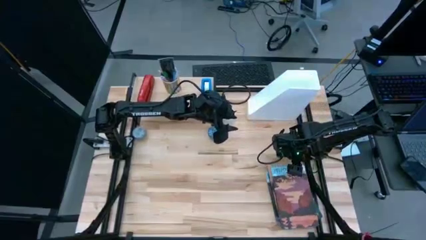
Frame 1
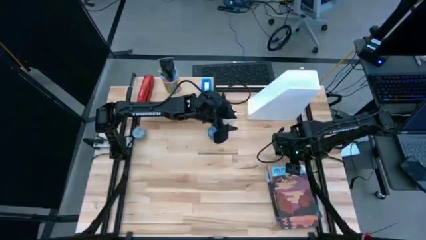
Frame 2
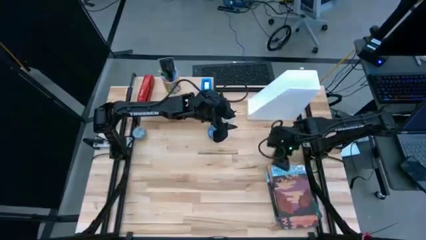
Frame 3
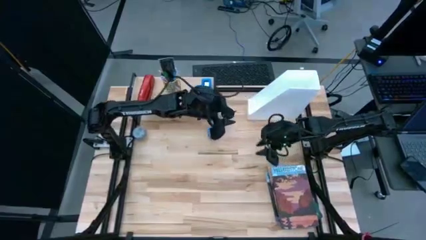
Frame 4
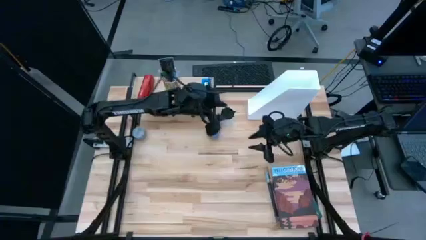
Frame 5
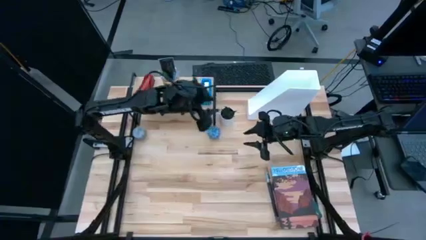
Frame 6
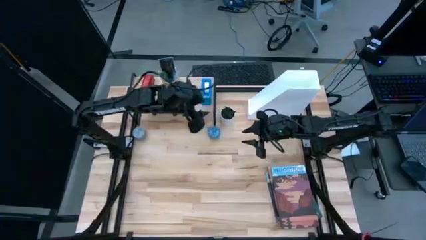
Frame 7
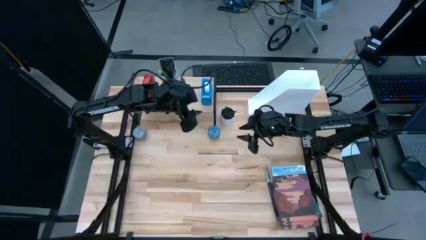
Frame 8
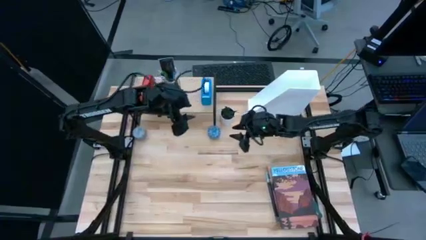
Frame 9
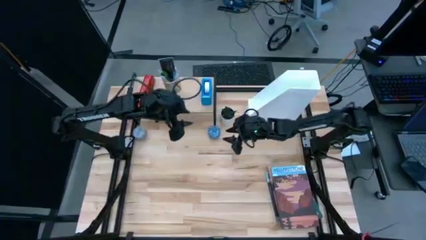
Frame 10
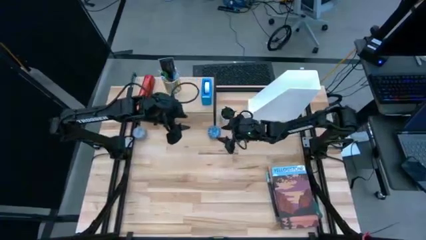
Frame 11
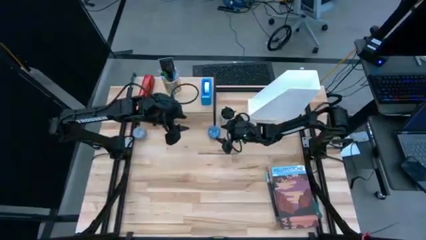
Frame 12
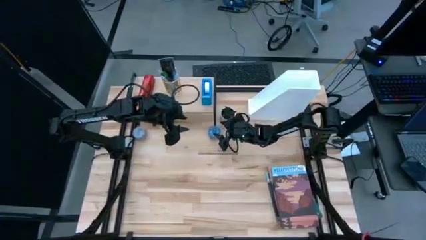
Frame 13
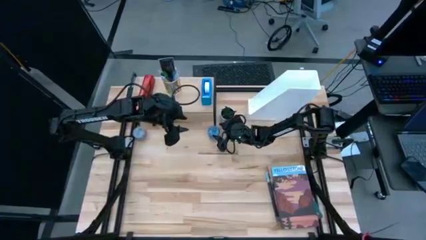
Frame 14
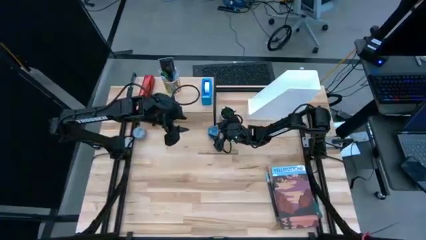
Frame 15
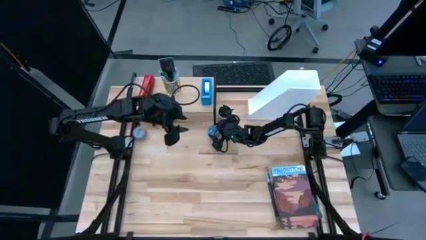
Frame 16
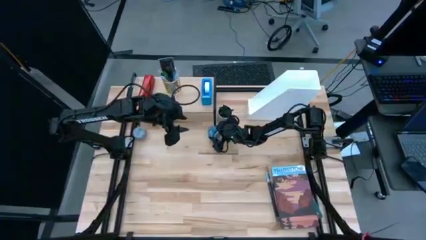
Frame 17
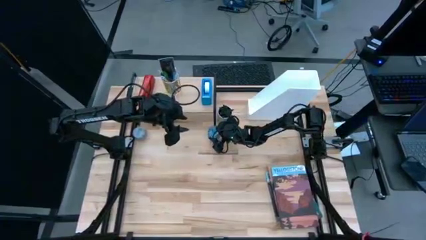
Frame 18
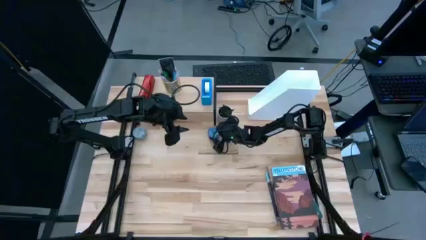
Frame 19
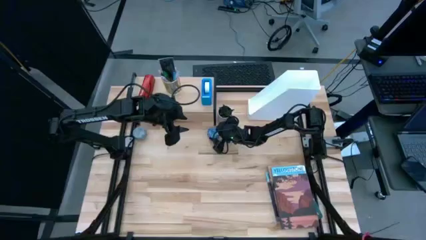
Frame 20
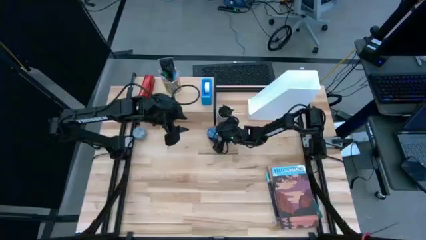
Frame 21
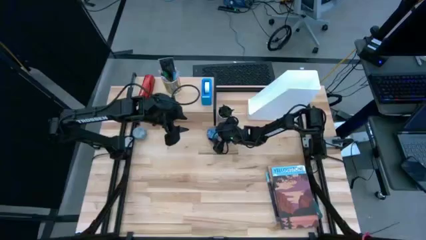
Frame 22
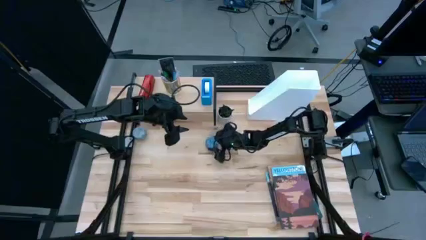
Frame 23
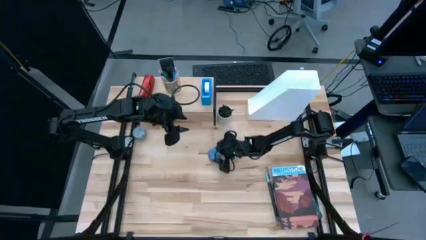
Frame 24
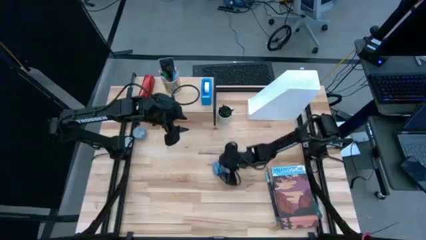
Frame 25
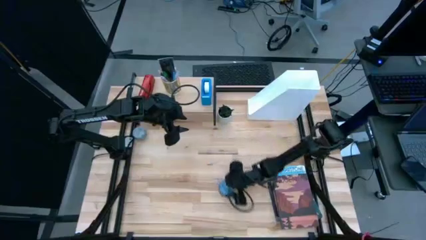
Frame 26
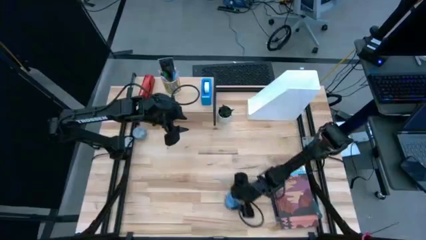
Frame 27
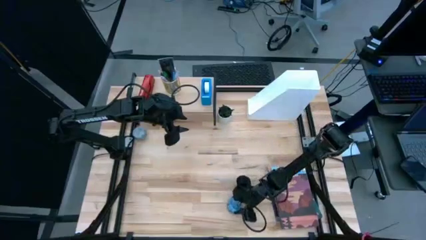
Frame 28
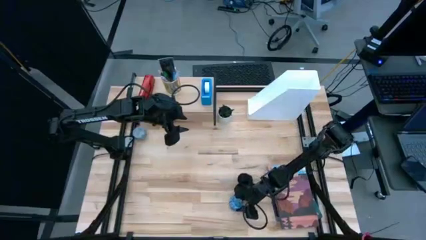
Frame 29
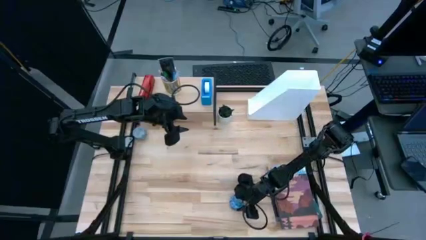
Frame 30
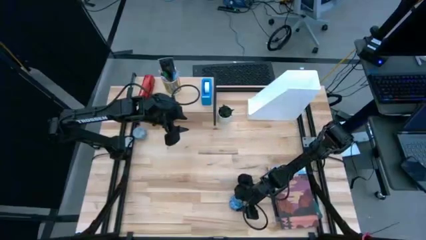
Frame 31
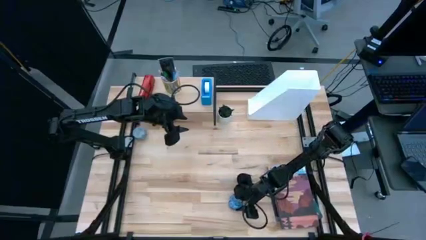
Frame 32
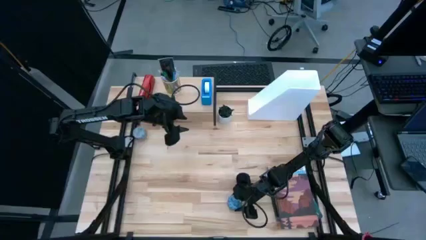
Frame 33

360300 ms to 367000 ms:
Task: Stock shelves
Remove the blue scented candle from under the shelf

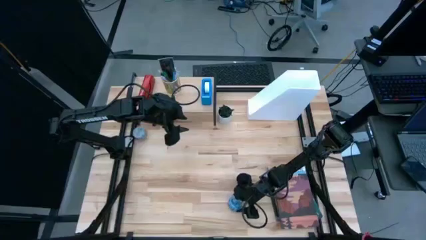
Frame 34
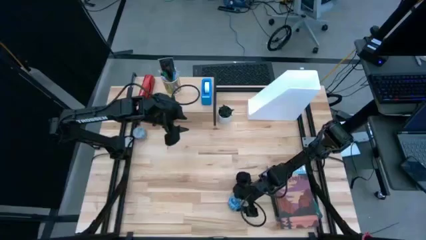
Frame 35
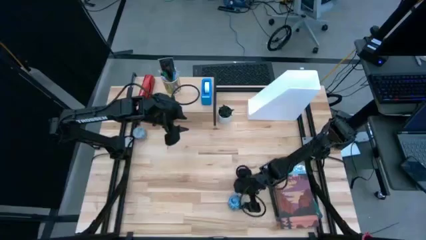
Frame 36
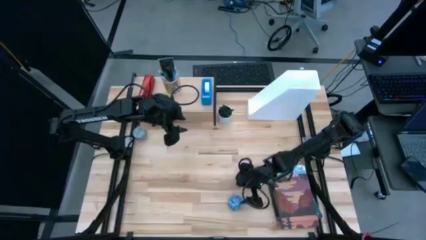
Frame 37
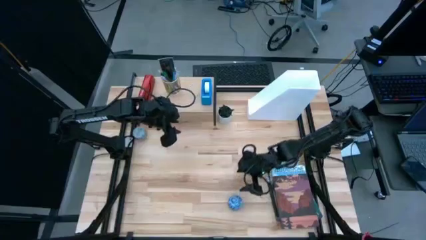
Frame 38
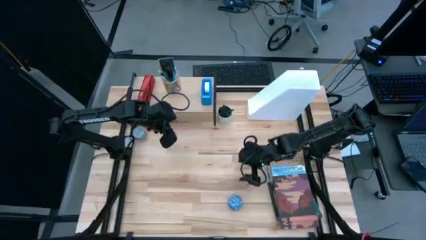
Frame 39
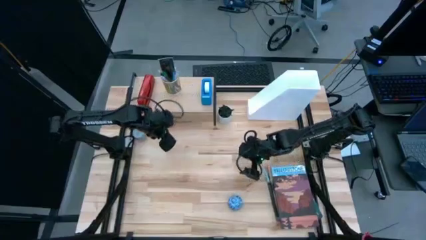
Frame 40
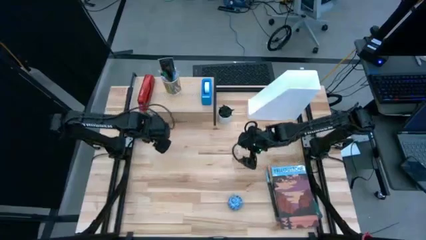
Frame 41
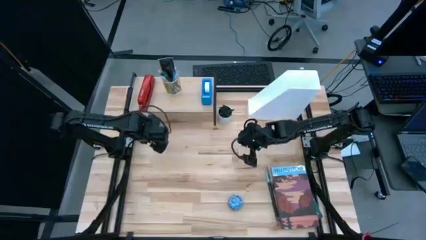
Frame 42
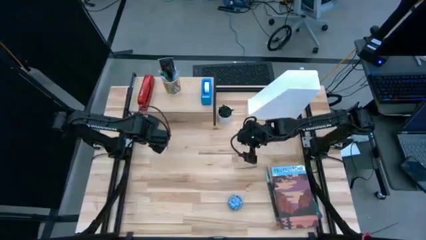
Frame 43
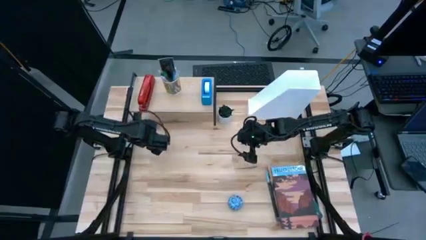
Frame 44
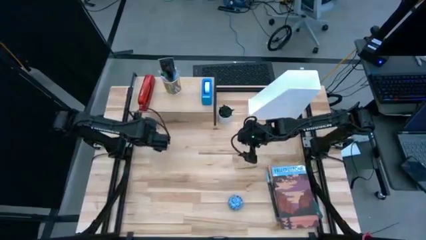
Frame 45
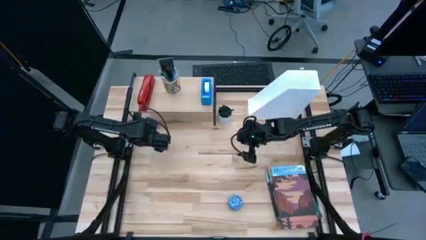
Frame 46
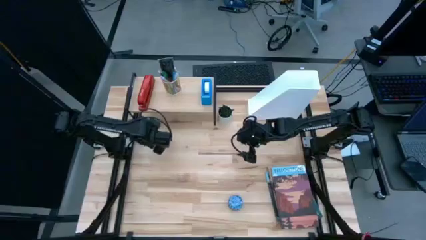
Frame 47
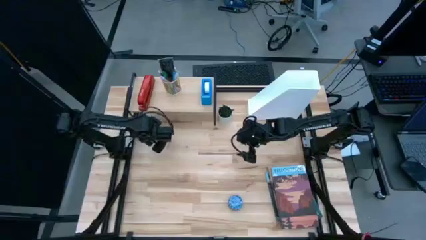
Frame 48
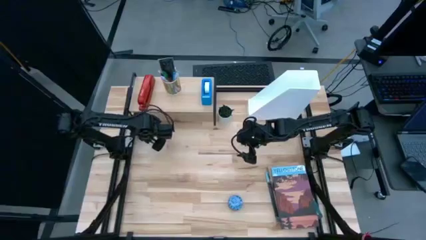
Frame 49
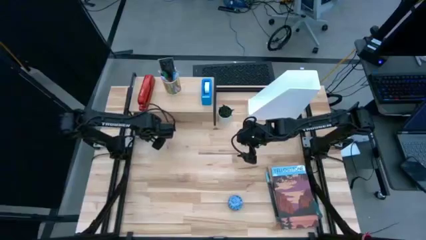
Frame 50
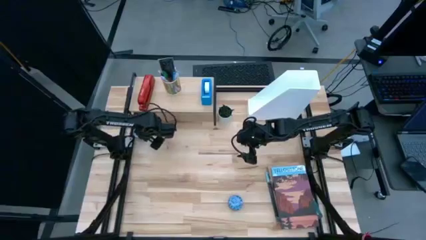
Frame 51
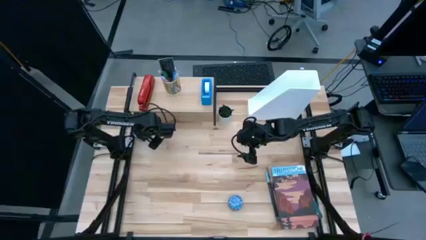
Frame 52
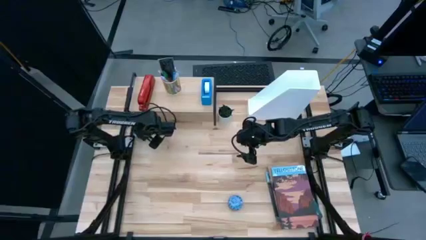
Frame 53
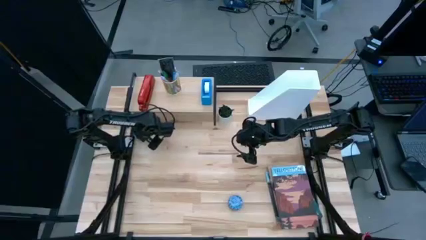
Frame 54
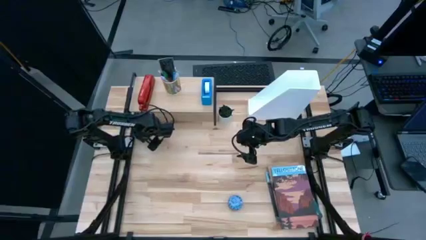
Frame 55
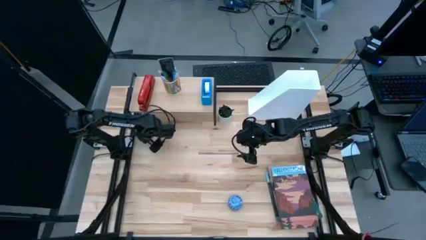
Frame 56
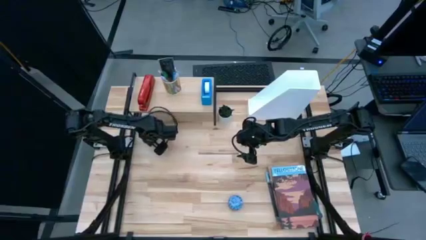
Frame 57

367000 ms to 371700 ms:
Remove the blue scented candle from under the shelf

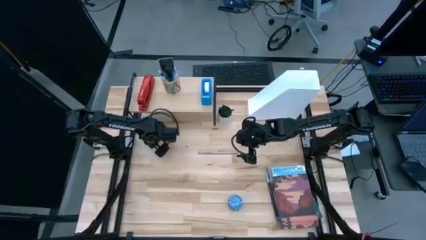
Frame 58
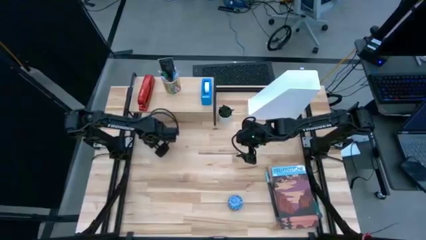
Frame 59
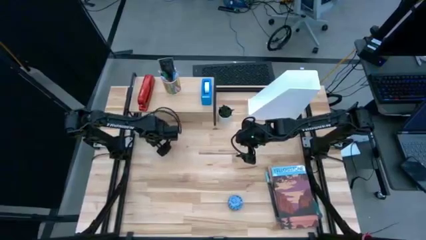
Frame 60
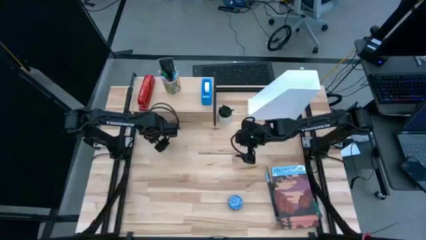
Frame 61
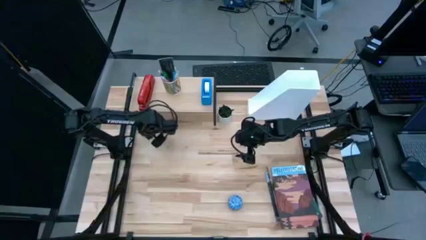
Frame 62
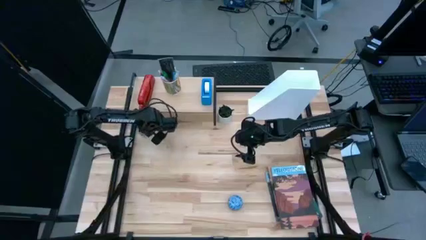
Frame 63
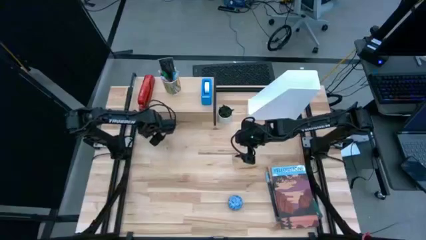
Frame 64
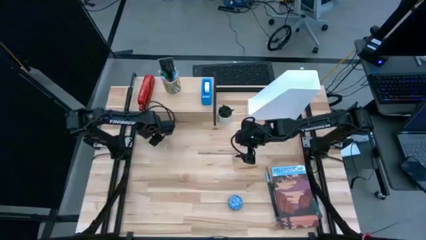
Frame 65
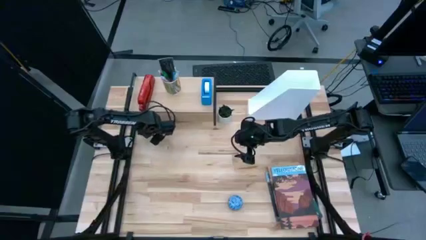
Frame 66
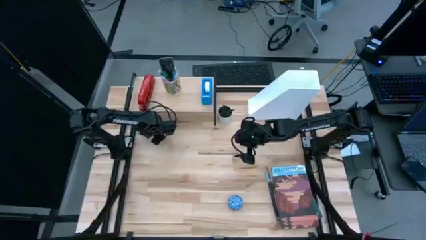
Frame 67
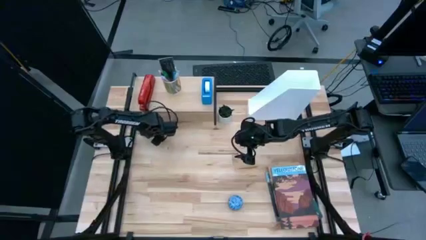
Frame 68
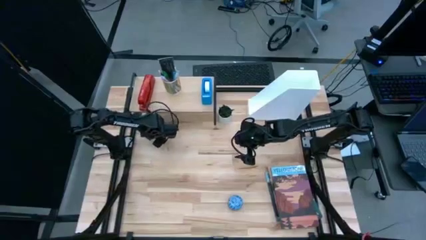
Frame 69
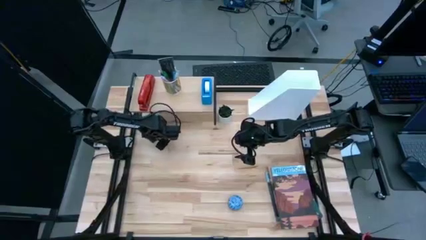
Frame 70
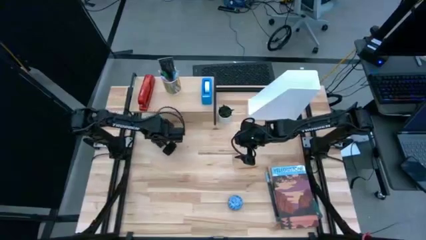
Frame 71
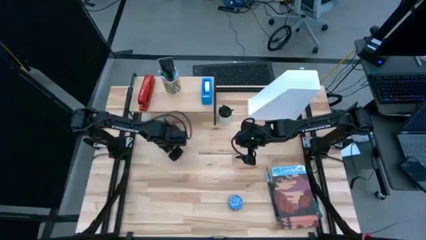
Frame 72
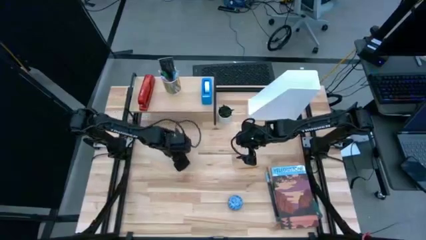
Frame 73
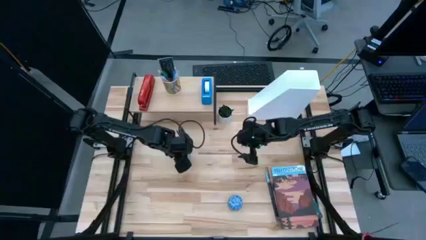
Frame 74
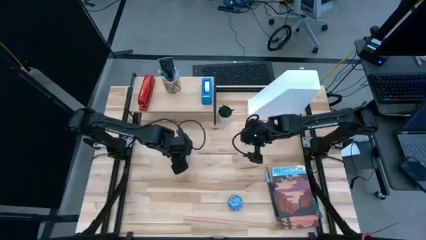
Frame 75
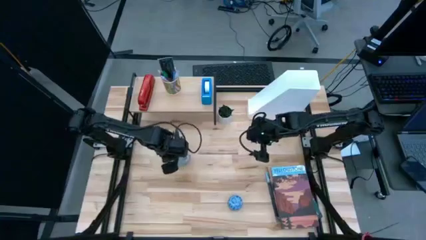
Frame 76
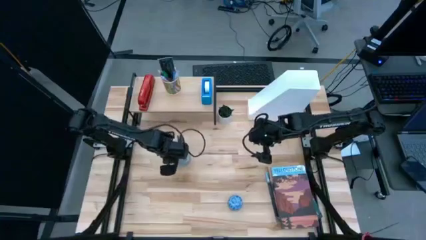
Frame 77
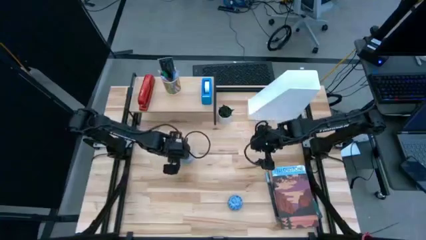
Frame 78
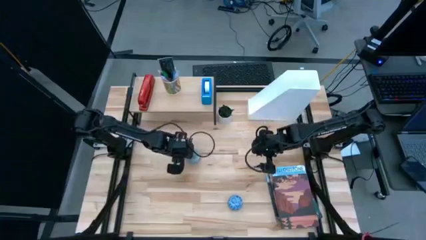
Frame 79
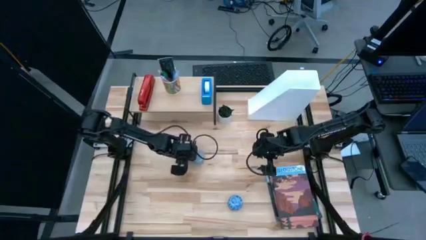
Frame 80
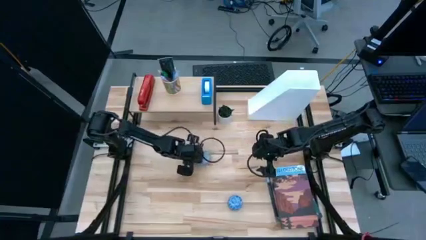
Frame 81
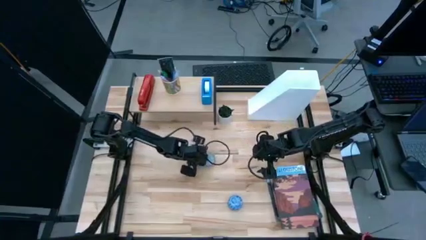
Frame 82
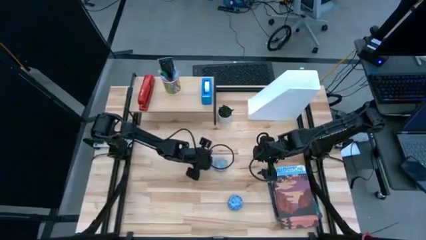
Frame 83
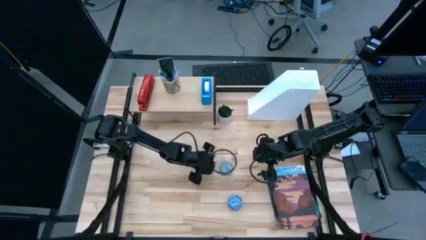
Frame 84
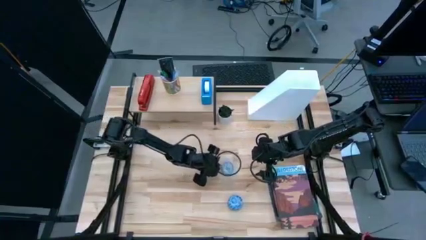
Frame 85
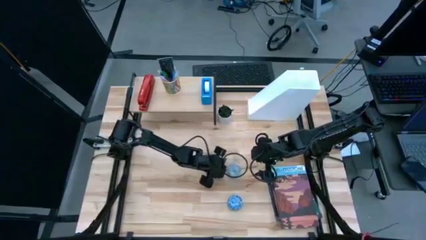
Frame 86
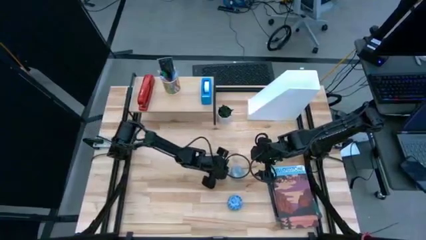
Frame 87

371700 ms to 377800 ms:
Remove the blue scented candle from under the shelf
